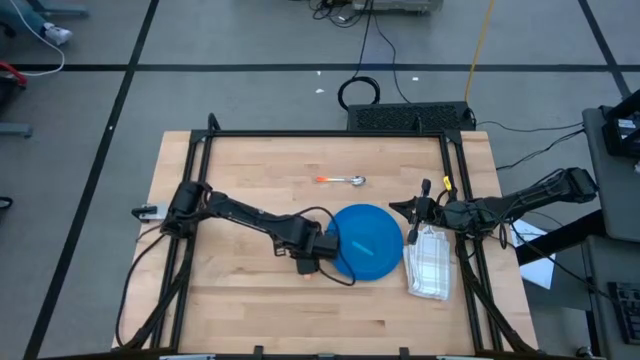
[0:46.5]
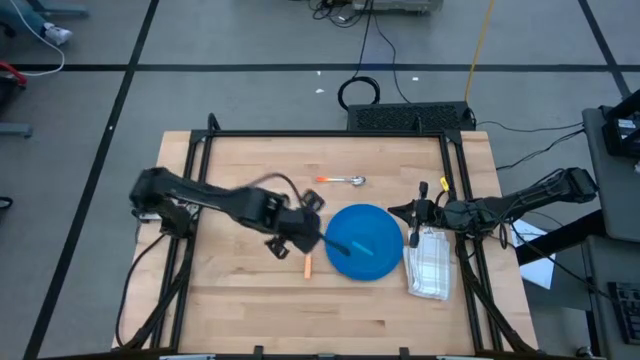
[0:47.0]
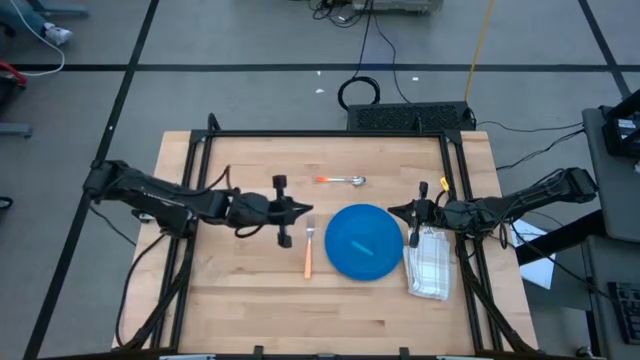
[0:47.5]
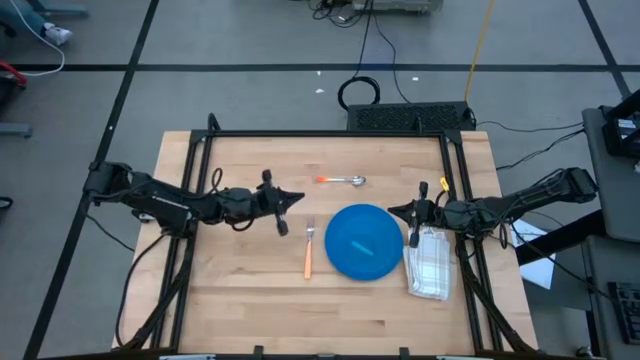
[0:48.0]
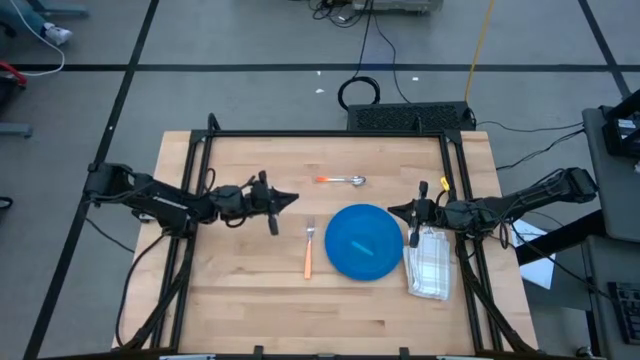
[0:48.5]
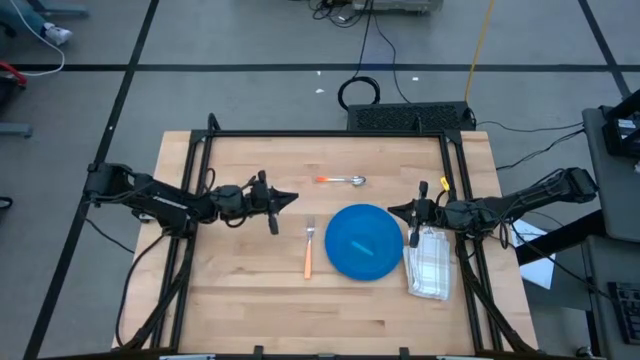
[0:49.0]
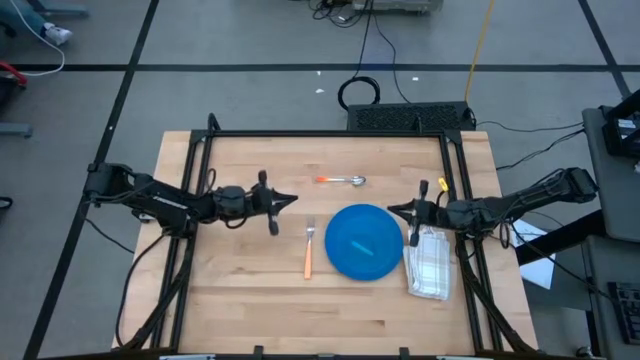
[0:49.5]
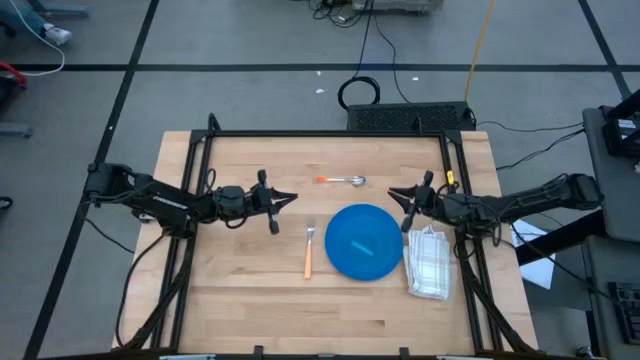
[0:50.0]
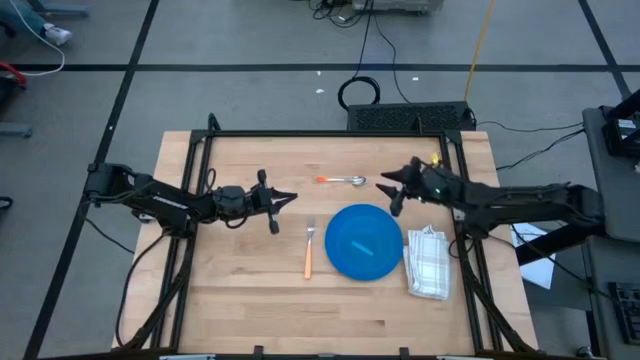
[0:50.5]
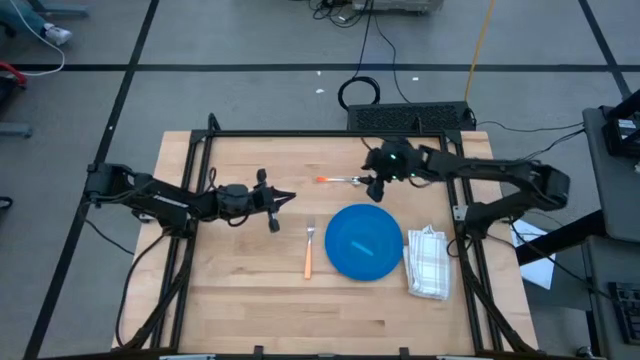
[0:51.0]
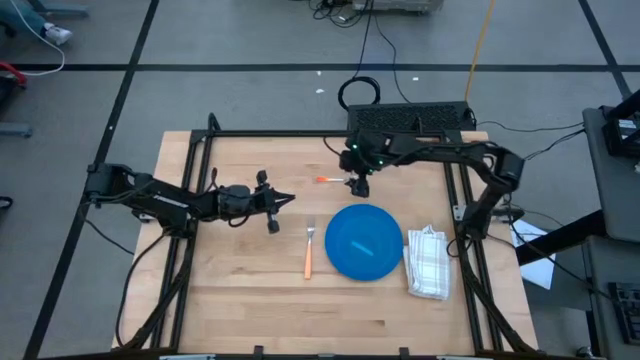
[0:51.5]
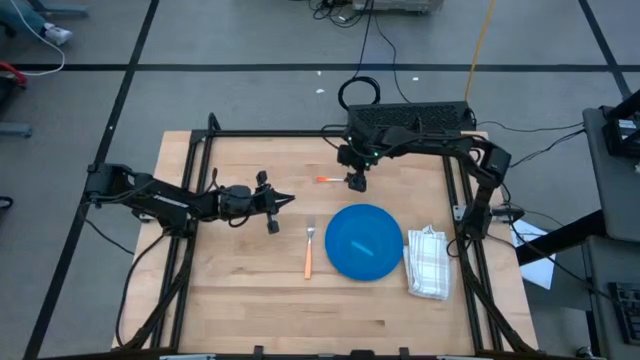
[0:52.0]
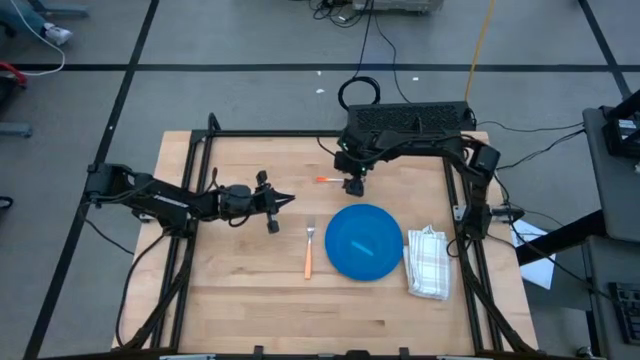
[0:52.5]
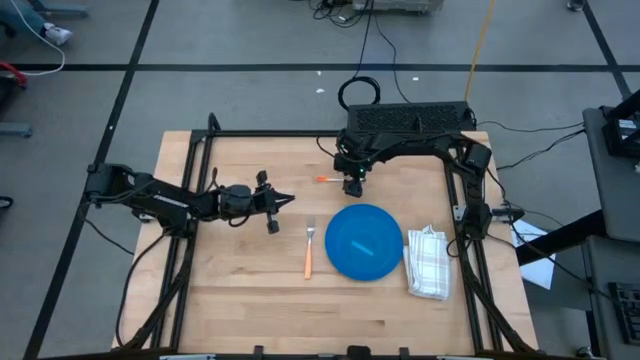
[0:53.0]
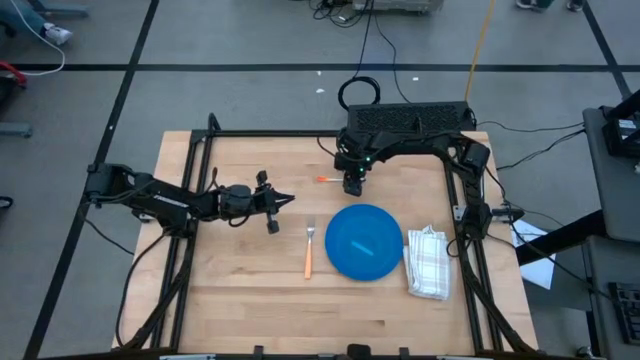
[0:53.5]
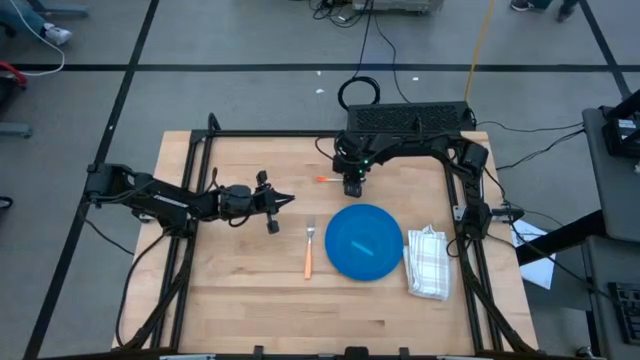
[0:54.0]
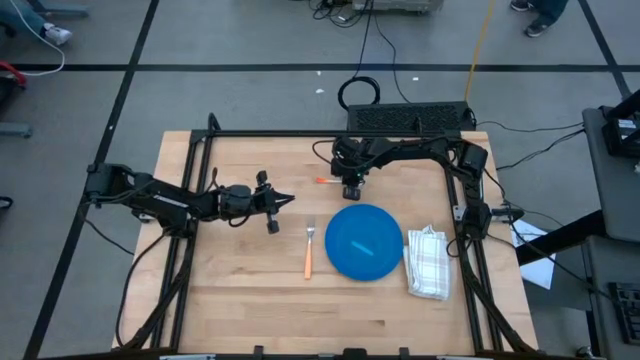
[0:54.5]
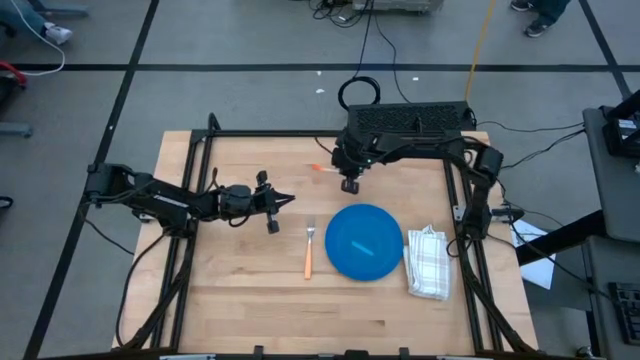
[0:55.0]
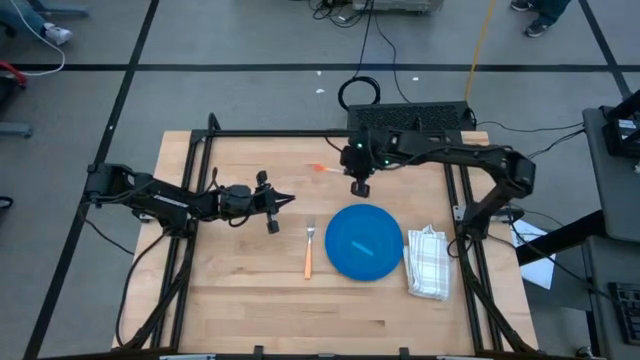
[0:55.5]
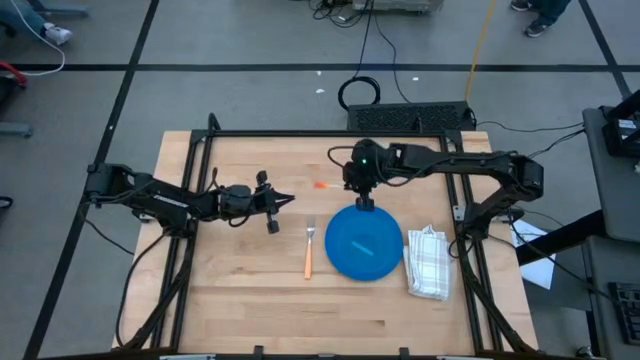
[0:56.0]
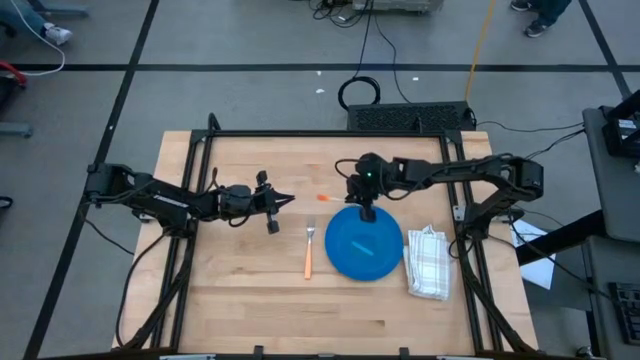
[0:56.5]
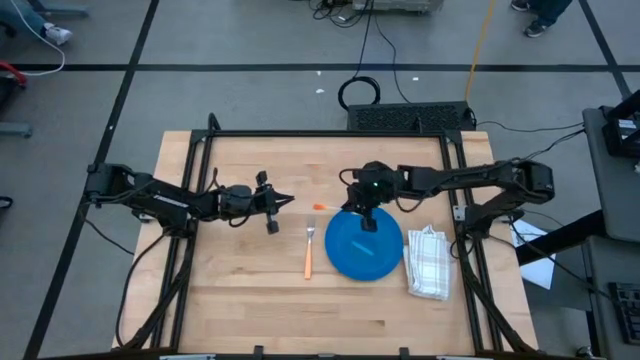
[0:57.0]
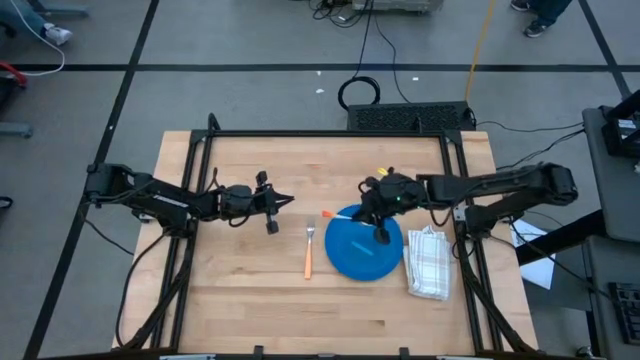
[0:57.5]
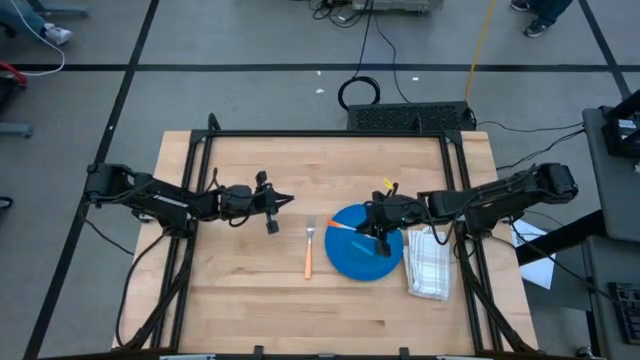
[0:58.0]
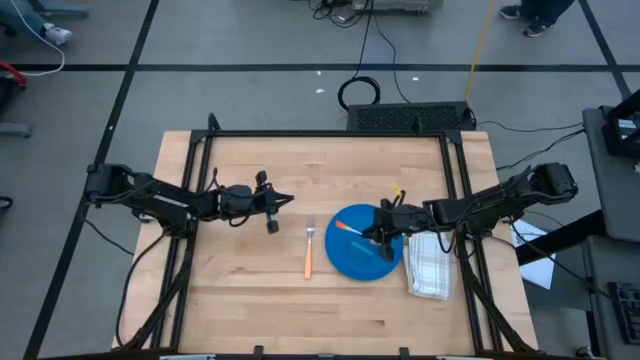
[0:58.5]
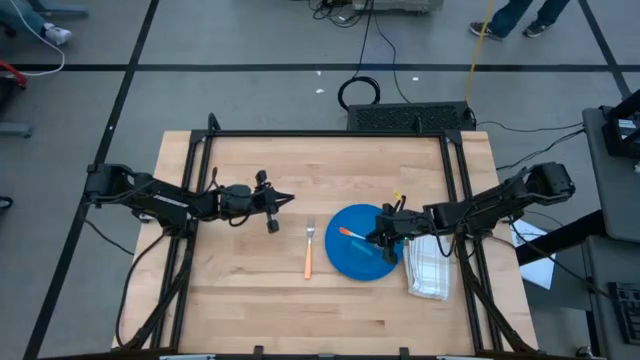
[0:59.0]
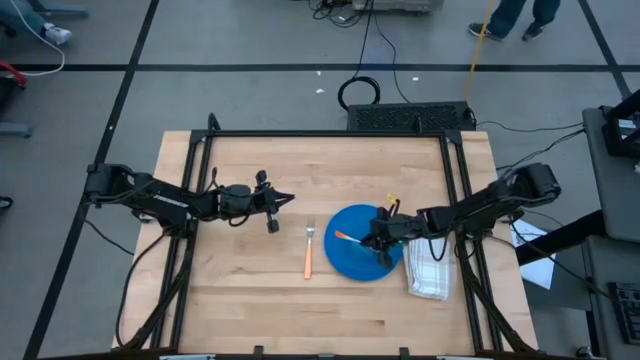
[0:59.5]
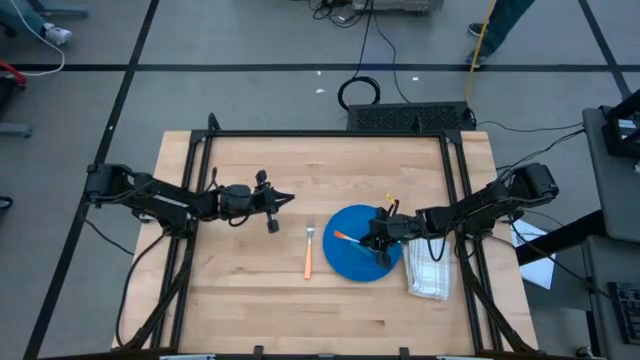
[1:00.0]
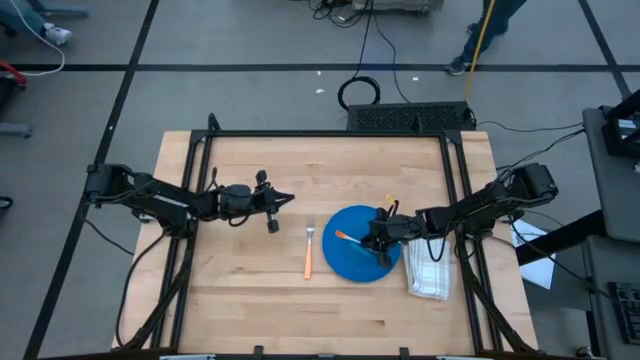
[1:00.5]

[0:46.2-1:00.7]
Task: Set table place
Put the orange spoon into the blue bowl

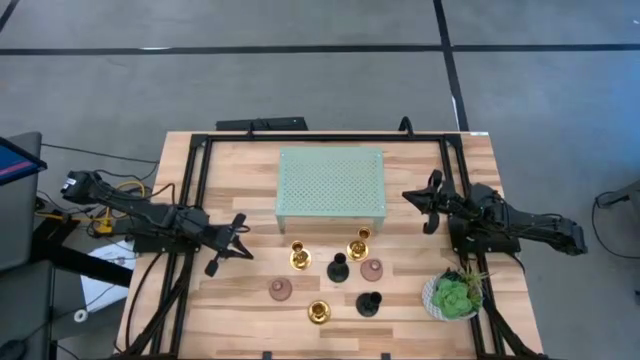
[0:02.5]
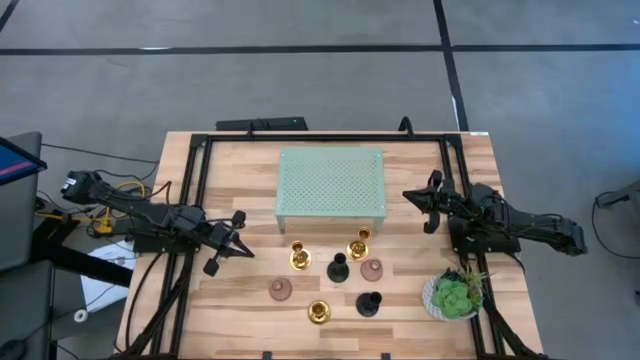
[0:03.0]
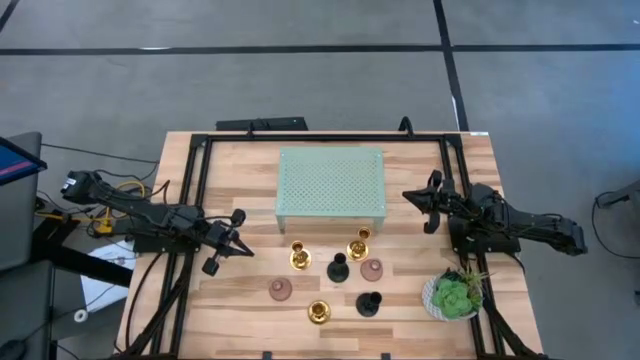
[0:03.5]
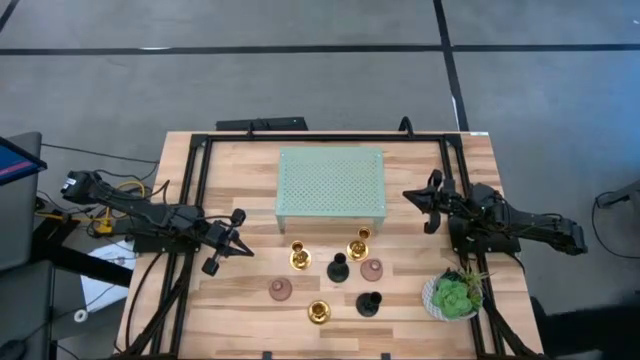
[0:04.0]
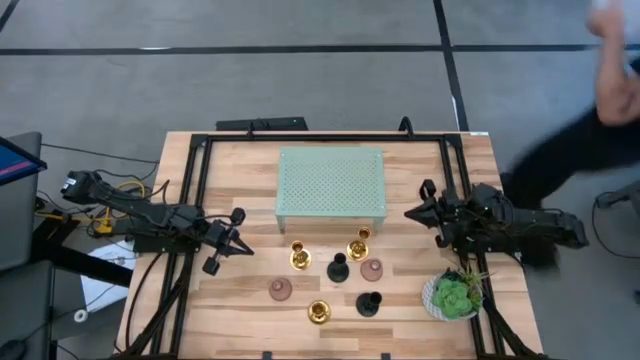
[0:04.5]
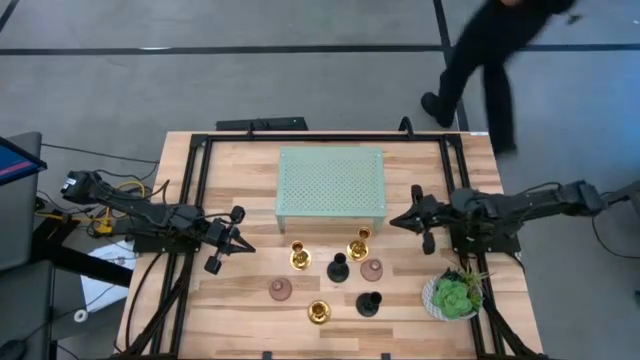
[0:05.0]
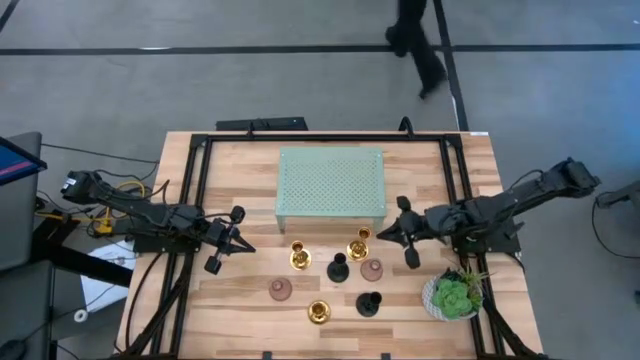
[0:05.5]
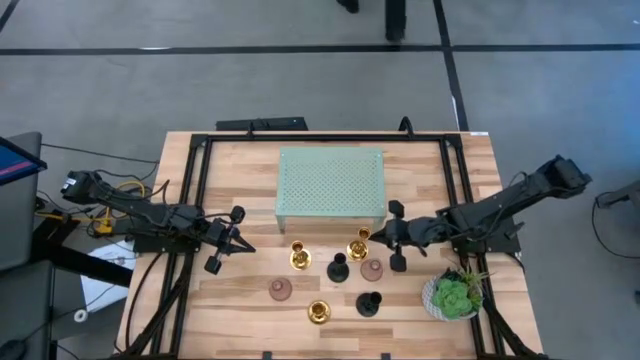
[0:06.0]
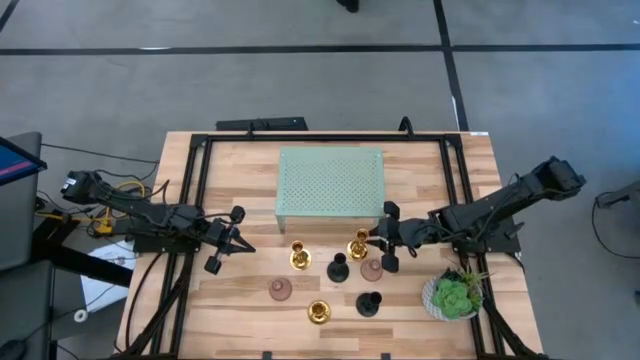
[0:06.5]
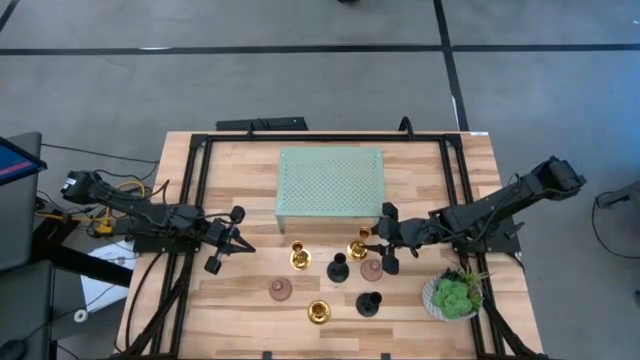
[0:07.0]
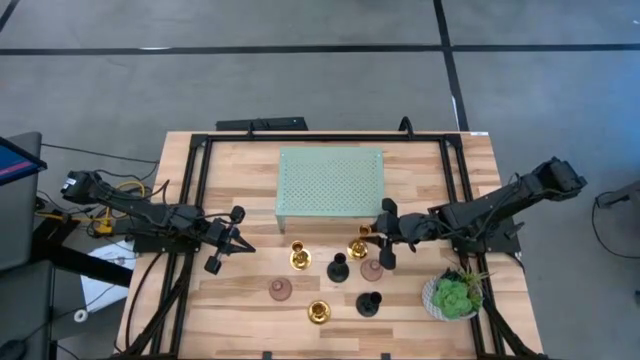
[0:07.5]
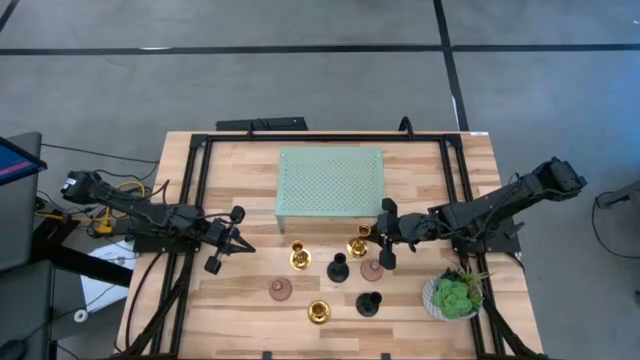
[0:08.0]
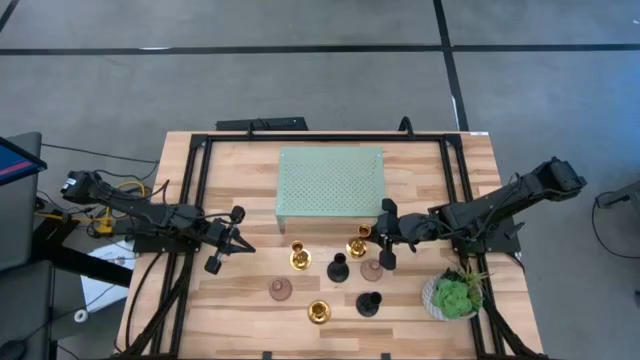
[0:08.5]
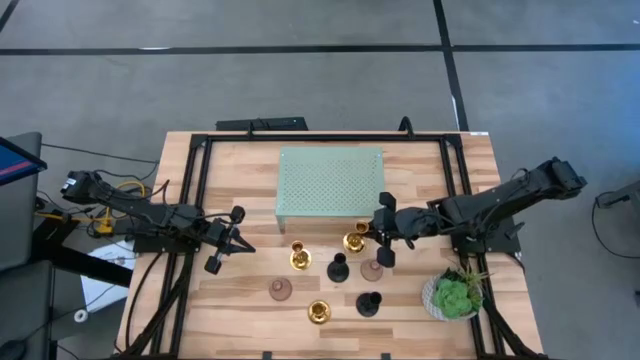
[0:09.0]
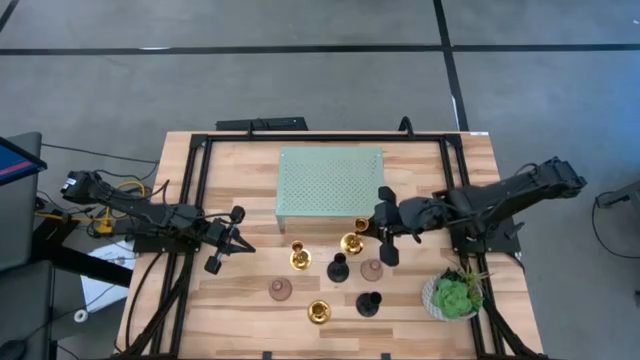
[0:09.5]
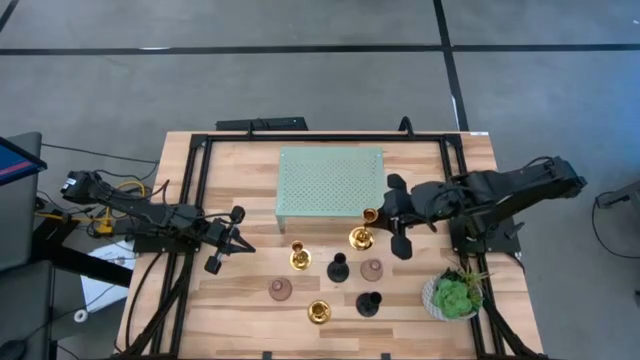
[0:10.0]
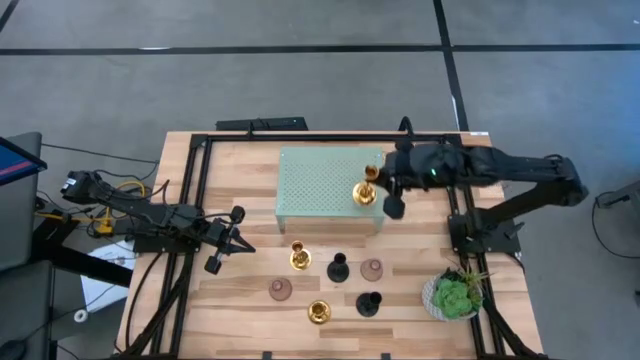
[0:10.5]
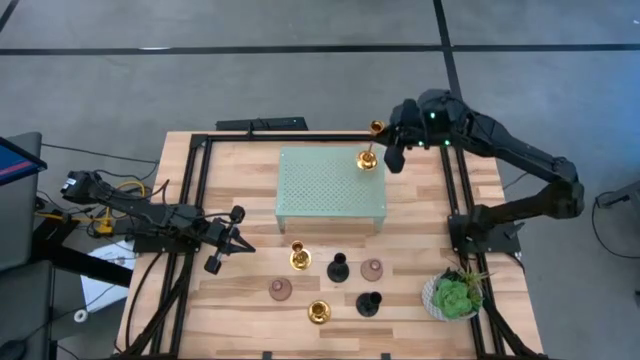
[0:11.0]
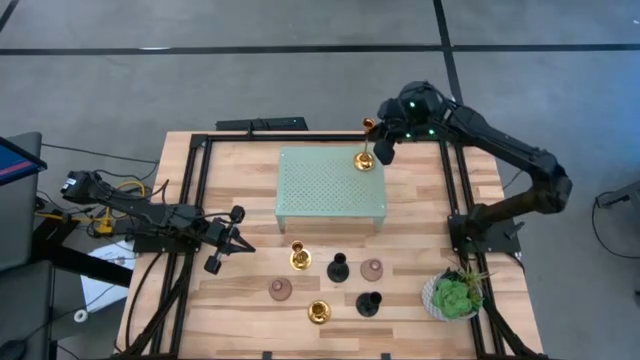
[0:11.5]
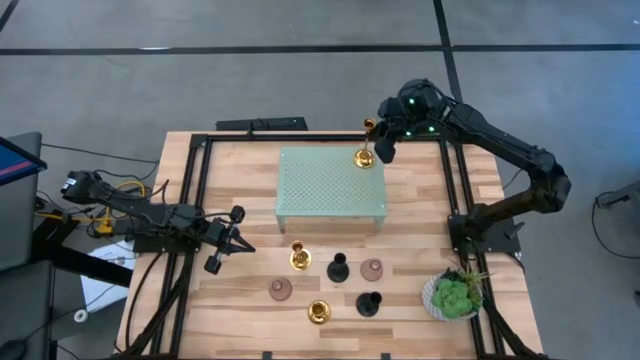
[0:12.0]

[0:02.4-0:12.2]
Task: Pick & Place candle stick holders
Put the right gold candle holder on the shelf
